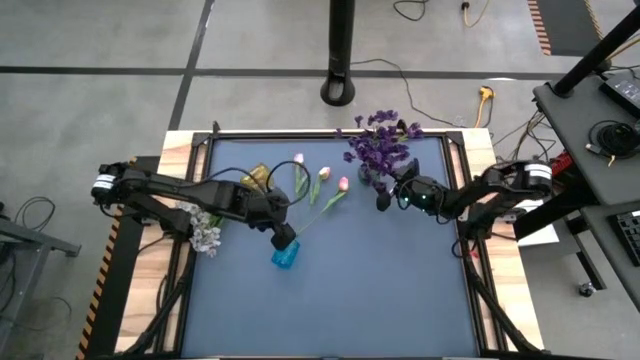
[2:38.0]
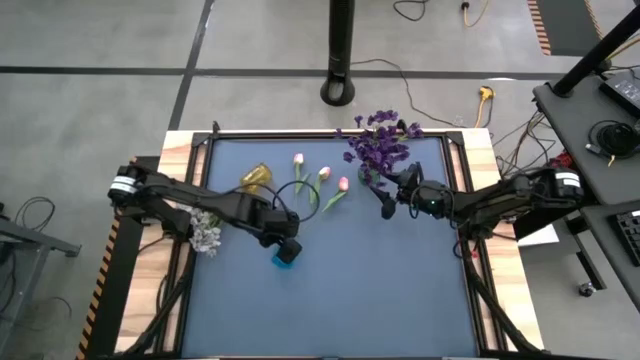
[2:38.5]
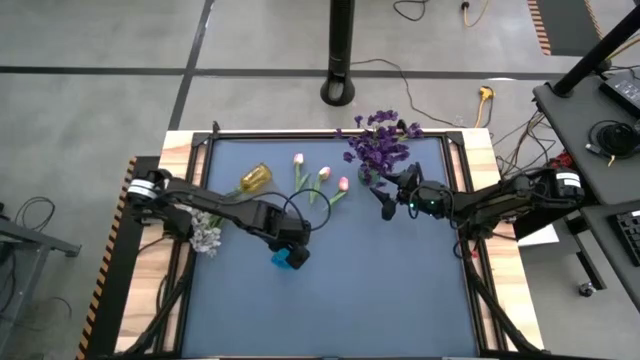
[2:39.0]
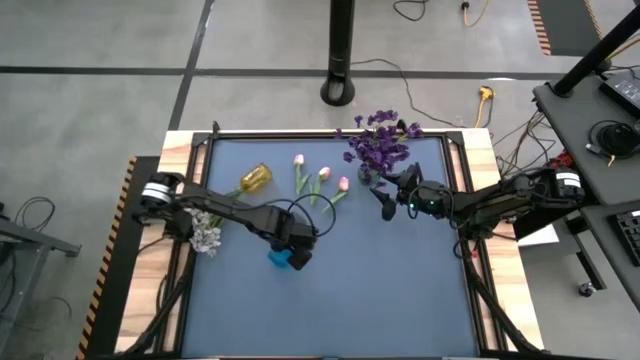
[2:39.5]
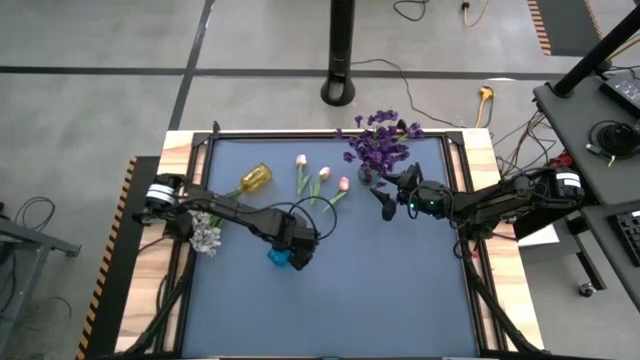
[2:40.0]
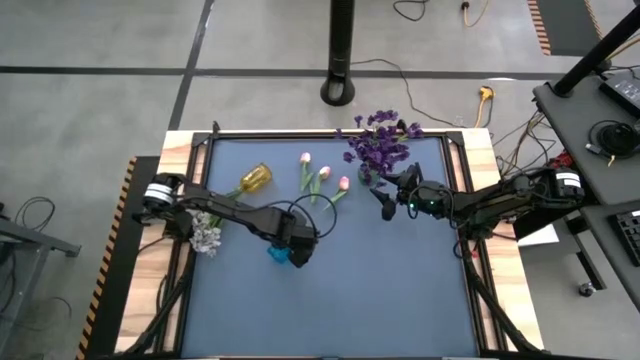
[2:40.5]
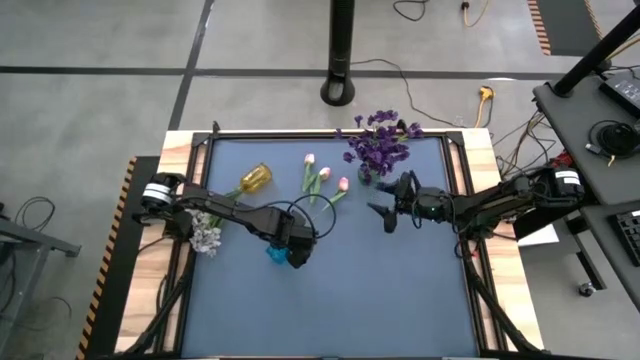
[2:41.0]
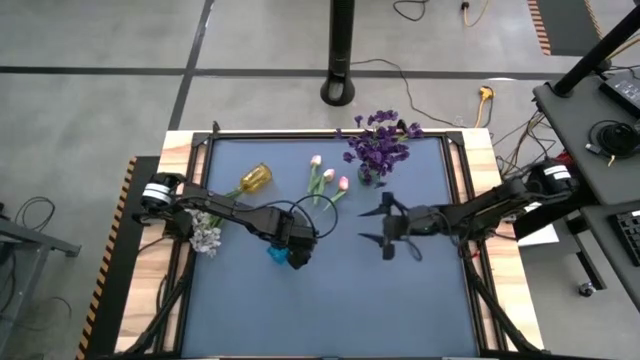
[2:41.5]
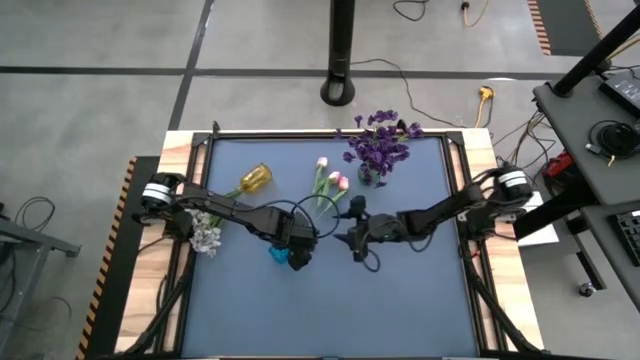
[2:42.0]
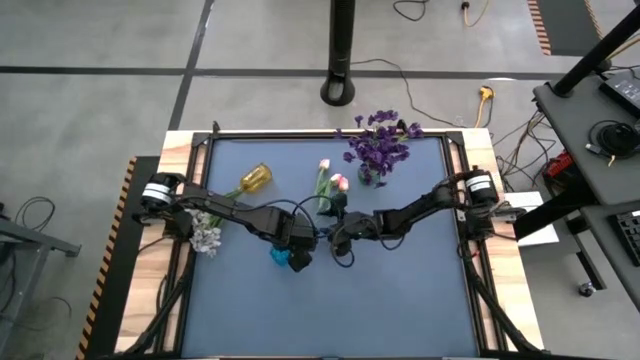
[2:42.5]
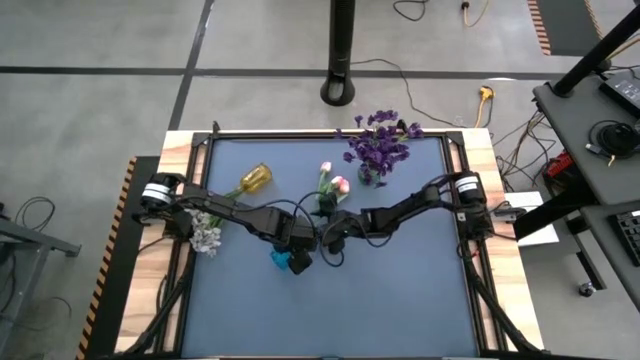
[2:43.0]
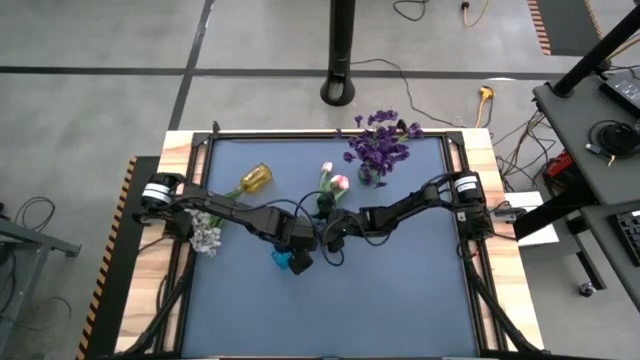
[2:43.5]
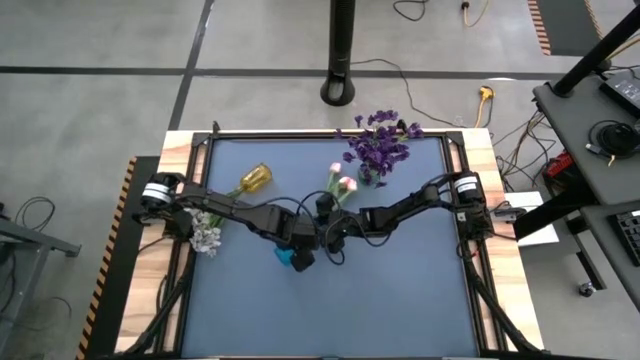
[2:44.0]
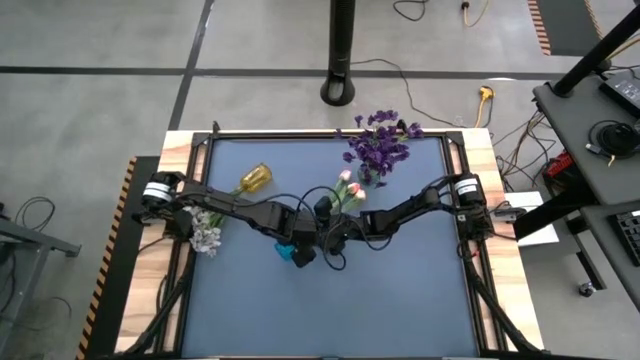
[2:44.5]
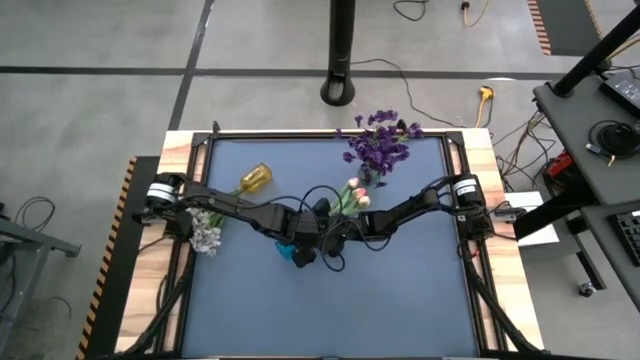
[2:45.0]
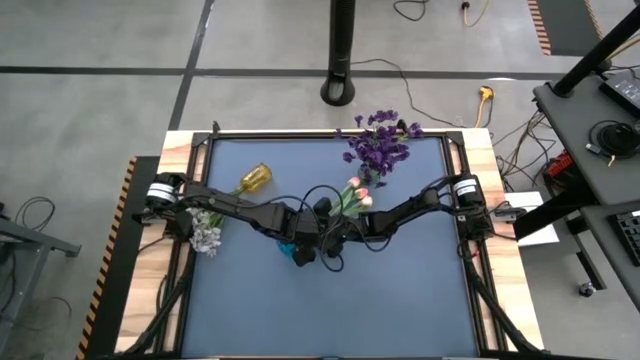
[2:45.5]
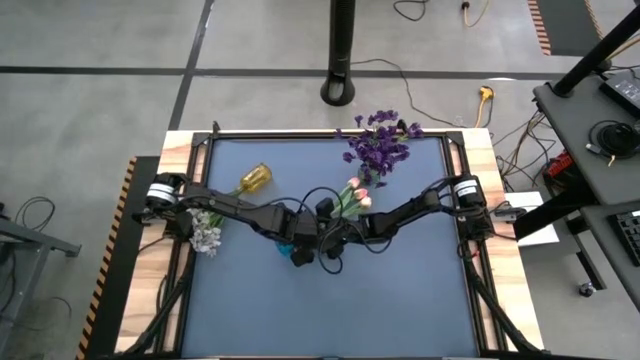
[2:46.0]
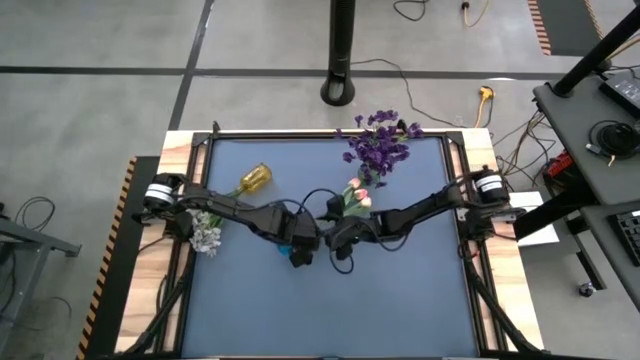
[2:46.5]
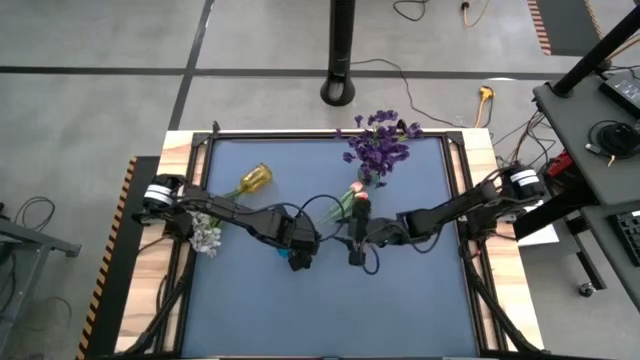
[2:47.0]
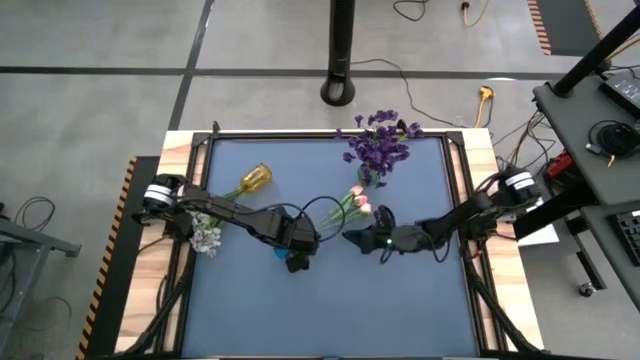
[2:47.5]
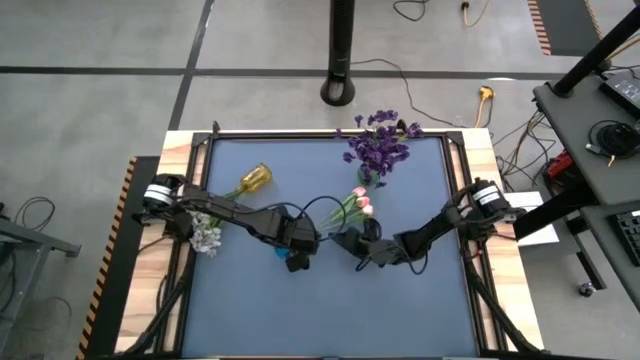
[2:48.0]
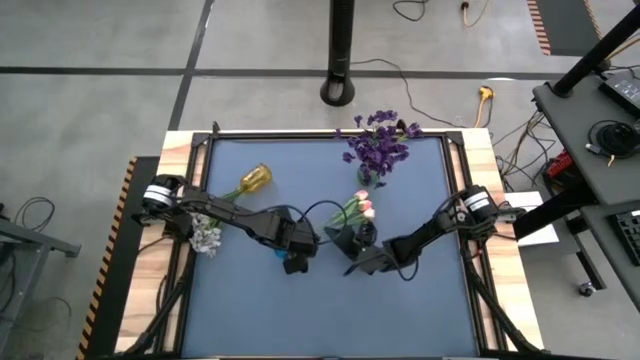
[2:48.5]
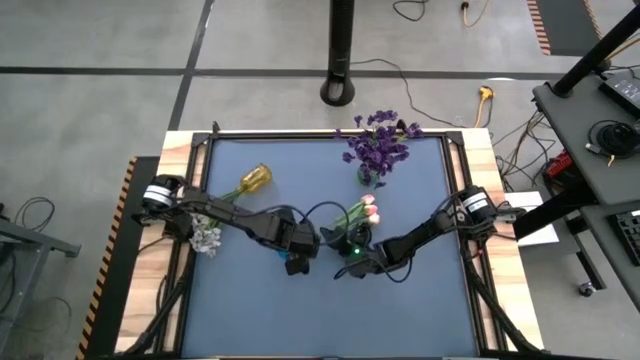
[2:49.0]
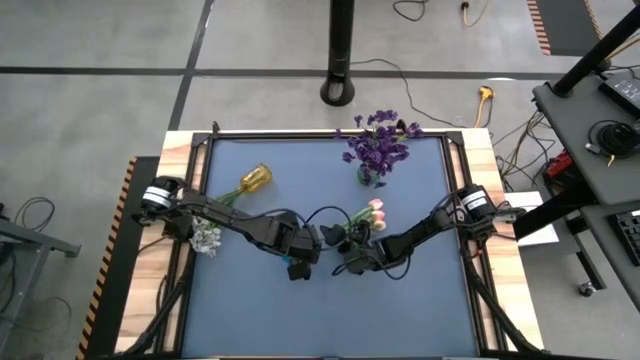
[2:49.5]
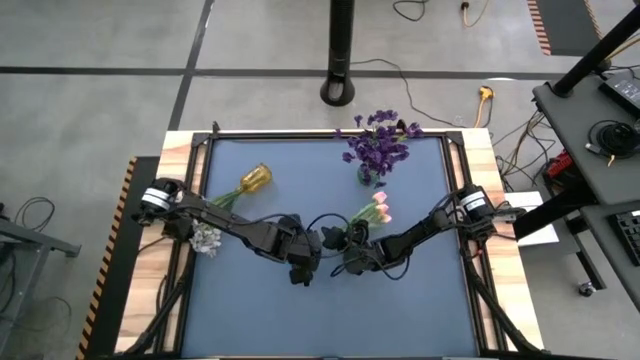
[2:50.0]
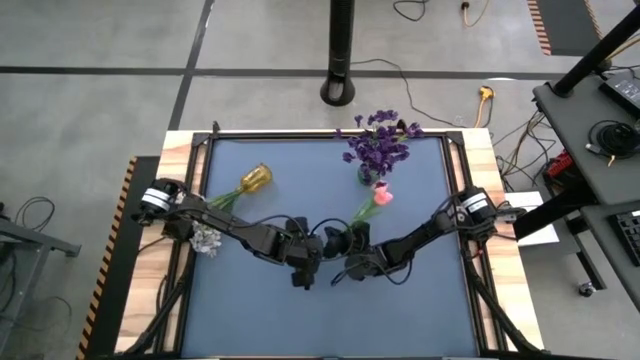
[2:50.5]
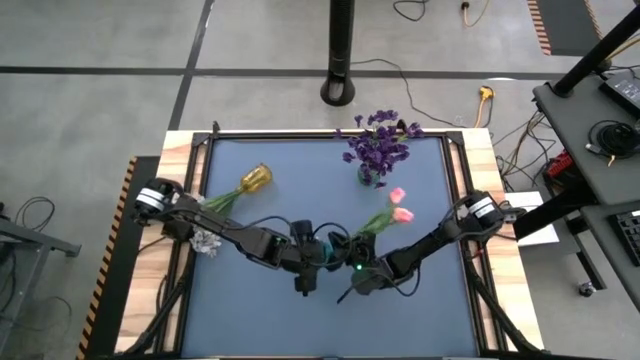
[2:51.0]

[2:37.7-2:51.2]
Task: Sort flowers into vase by color
Put the blue vase with flowers on the table

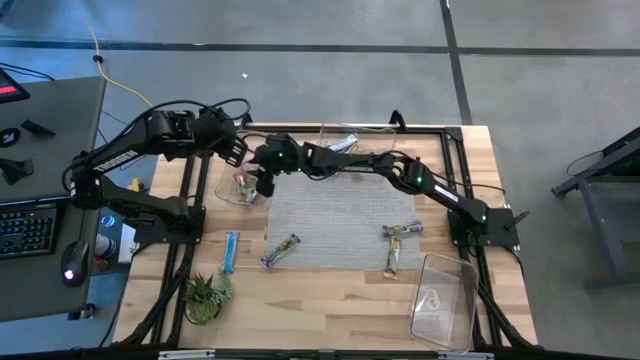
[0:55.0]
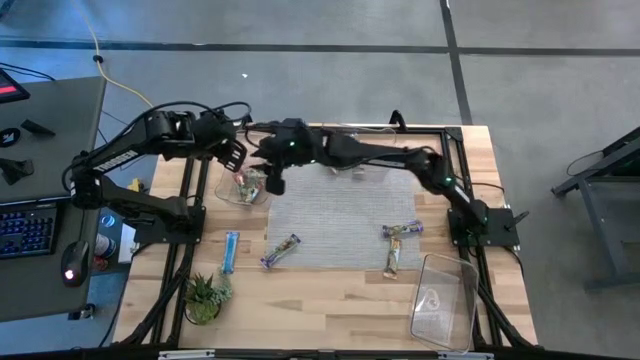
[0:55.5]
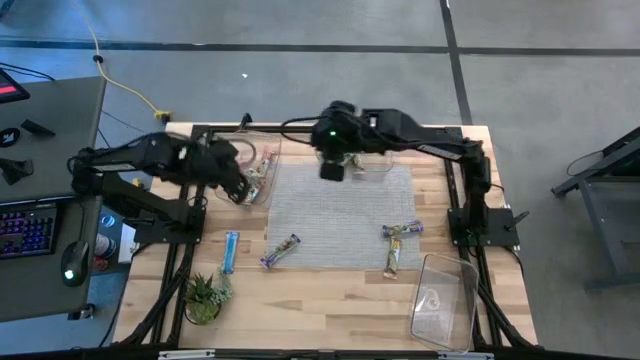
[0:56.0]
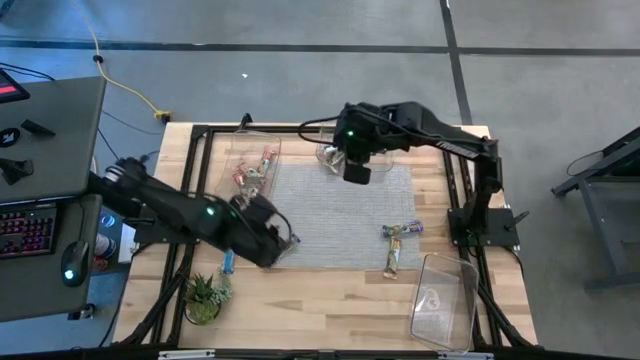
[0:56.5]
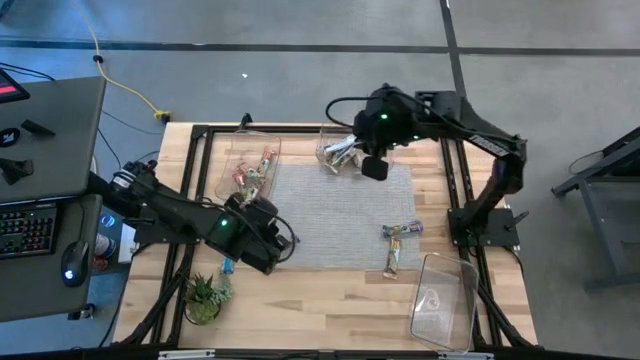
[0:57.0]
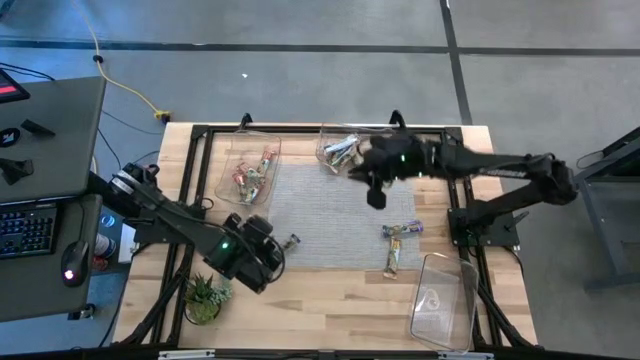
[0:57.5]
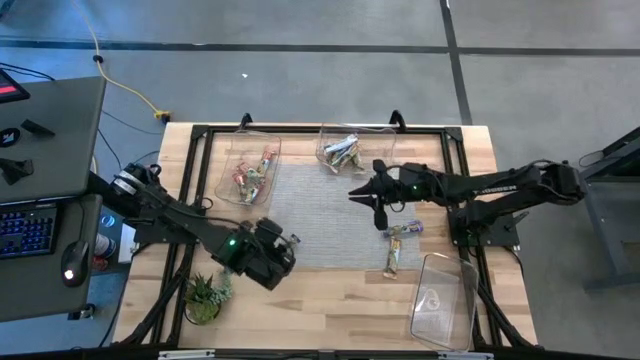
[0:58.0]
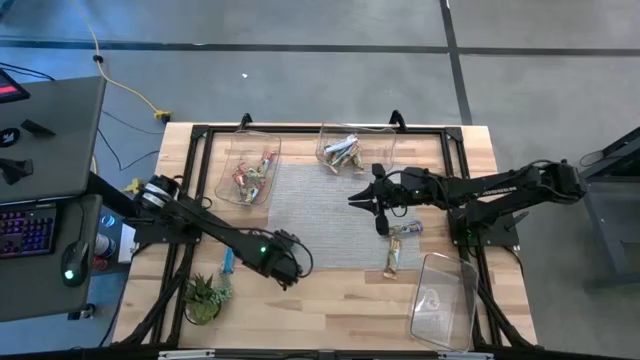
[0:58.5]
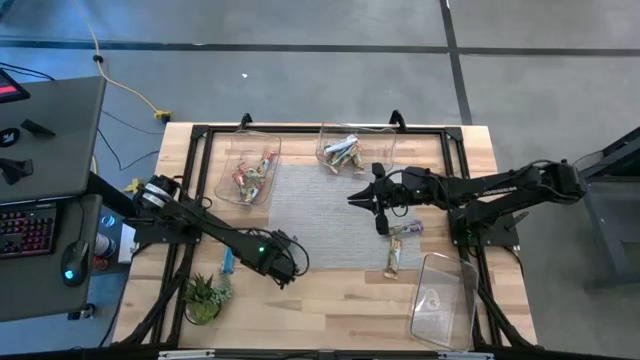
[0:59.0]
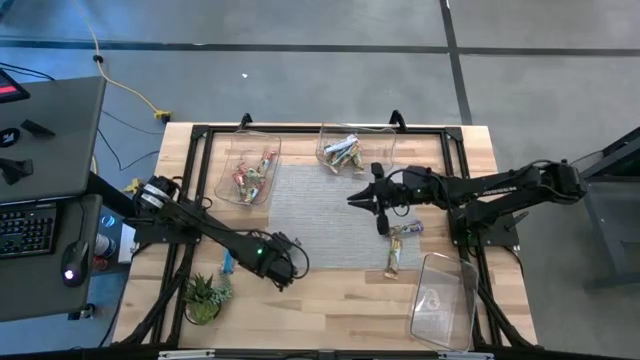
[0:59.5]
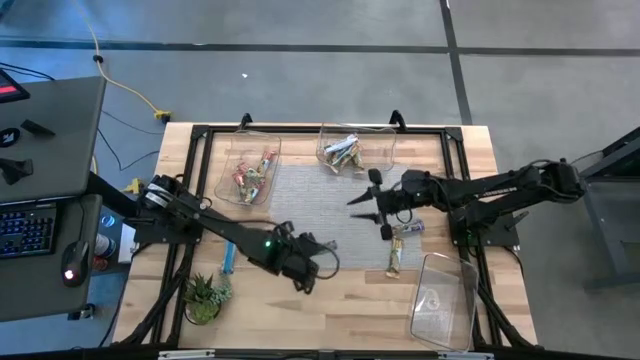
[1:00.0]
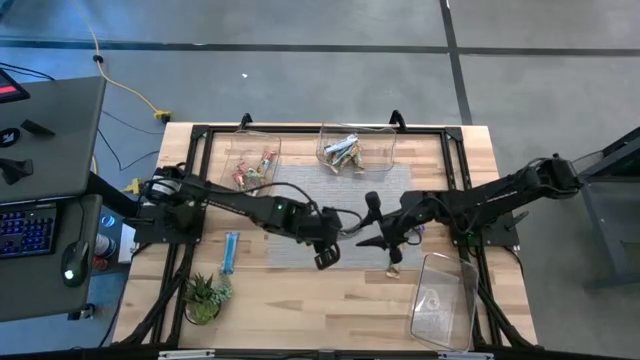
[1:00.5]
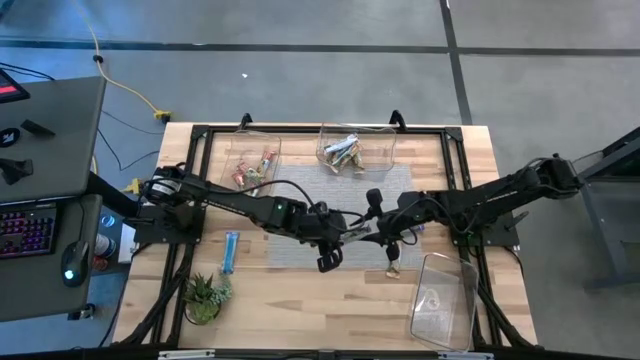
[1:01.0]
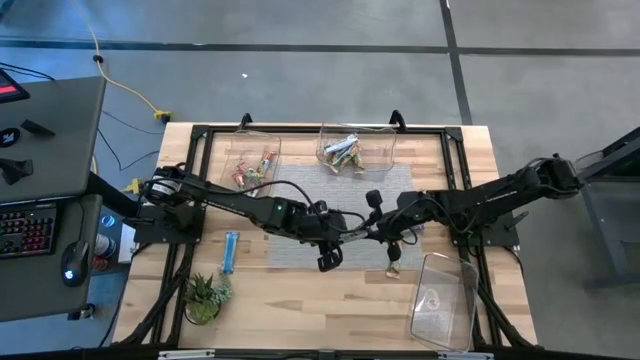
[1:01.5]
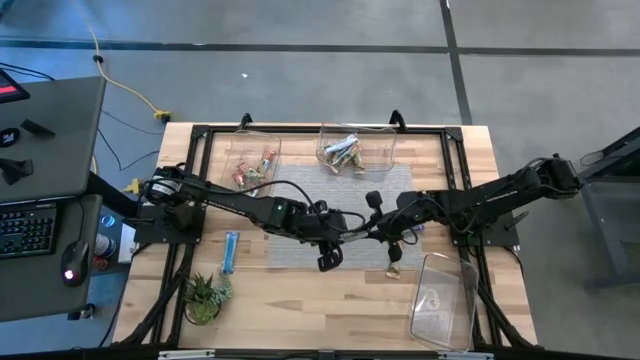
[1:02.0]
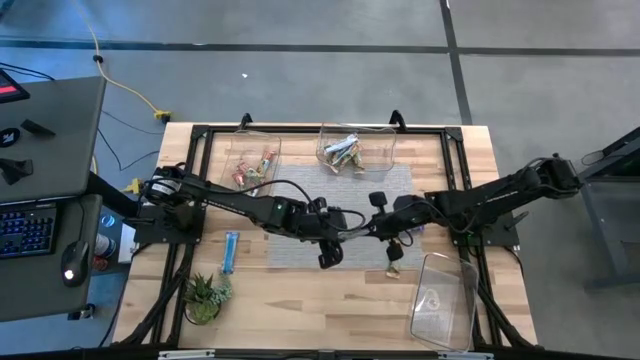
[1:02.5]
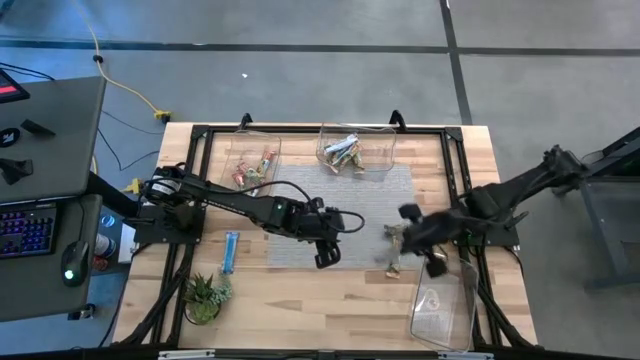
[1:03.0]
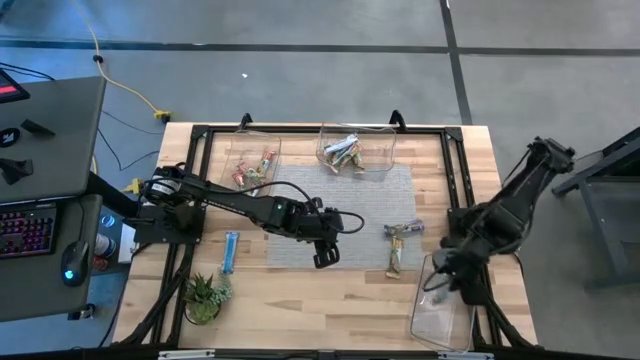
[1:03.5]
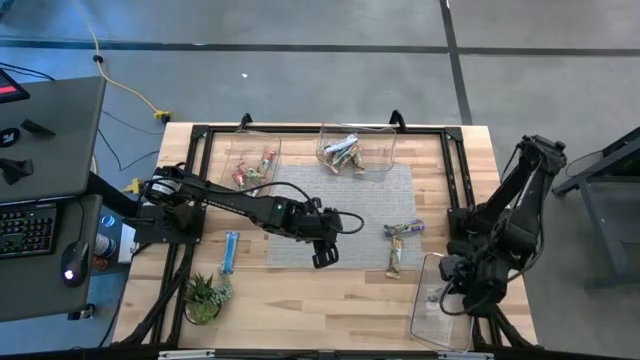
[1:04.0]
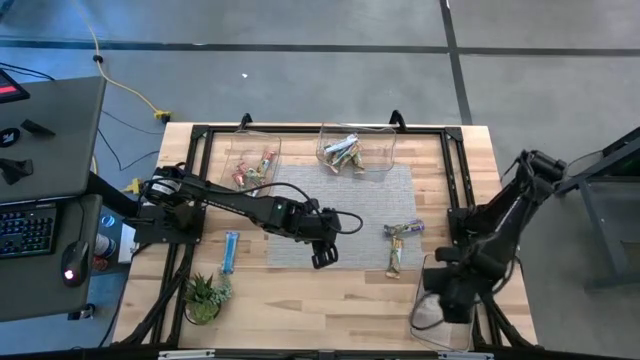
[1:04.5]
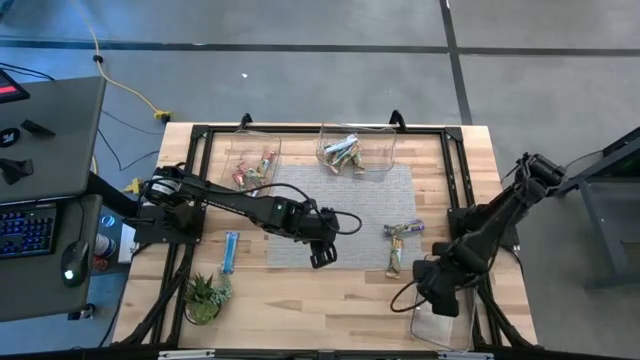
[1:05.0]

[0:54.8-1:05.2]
Task: Pick and place Granola Bars by type
Put the blue granola bar into the bottom transparent bin
